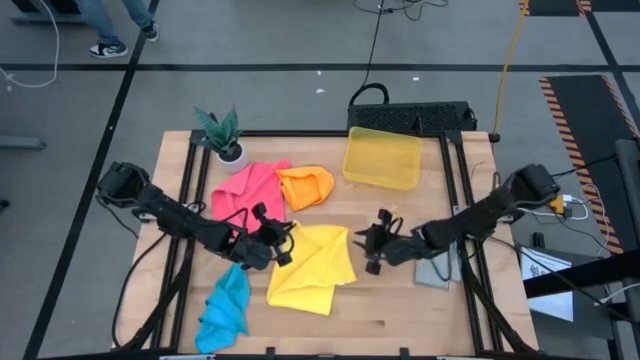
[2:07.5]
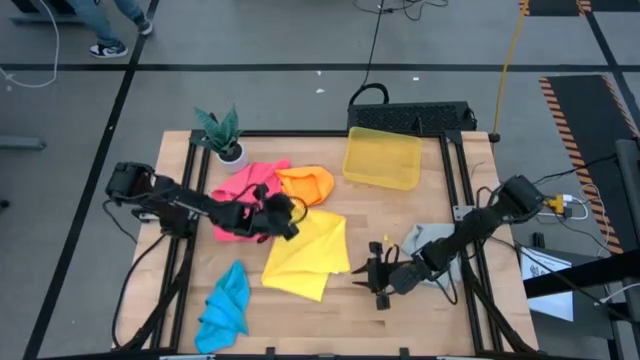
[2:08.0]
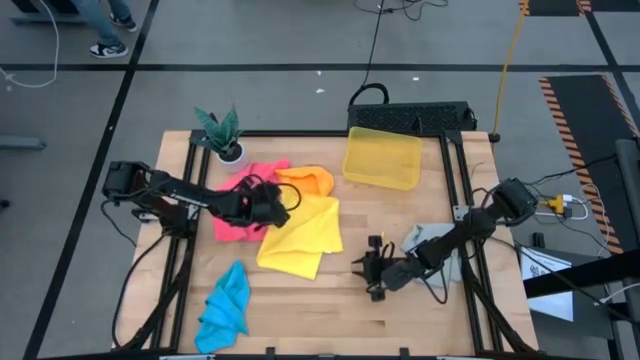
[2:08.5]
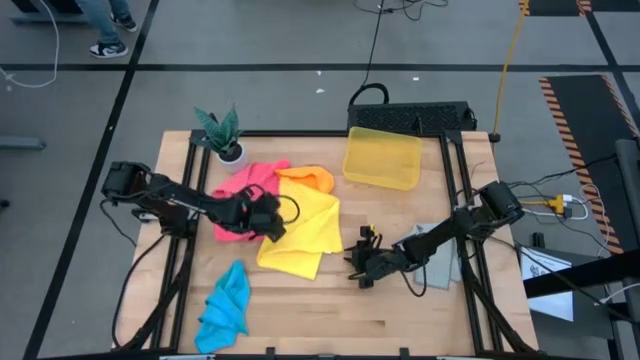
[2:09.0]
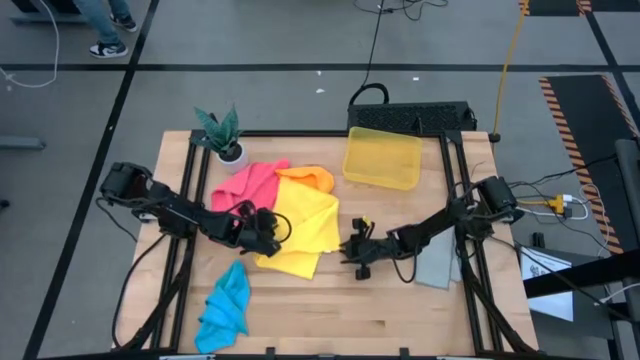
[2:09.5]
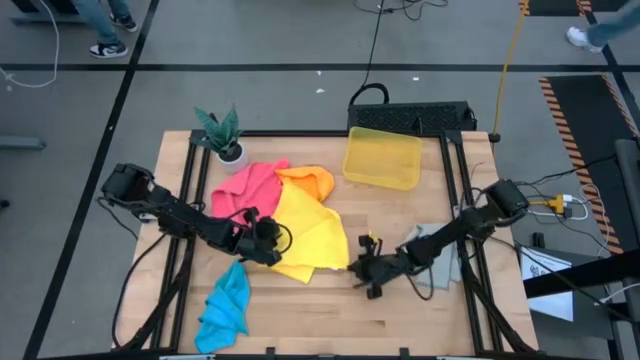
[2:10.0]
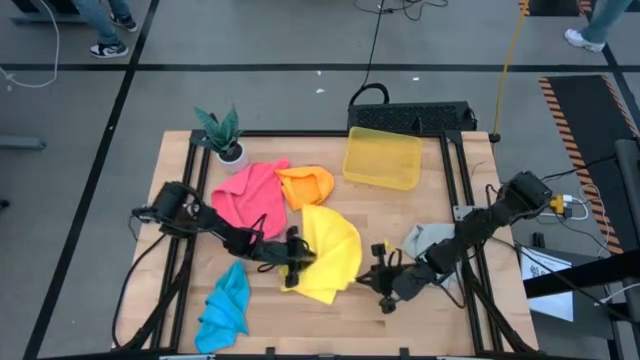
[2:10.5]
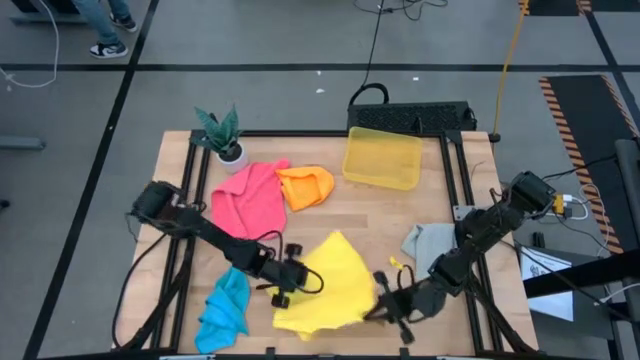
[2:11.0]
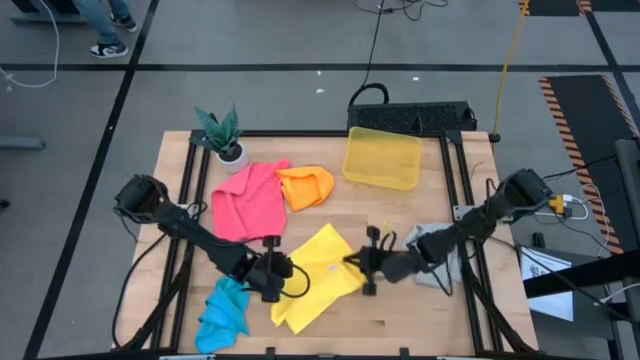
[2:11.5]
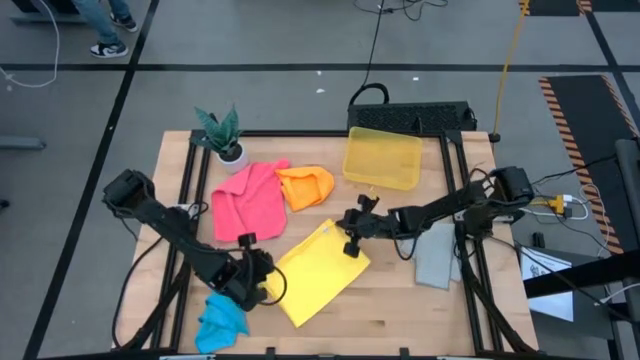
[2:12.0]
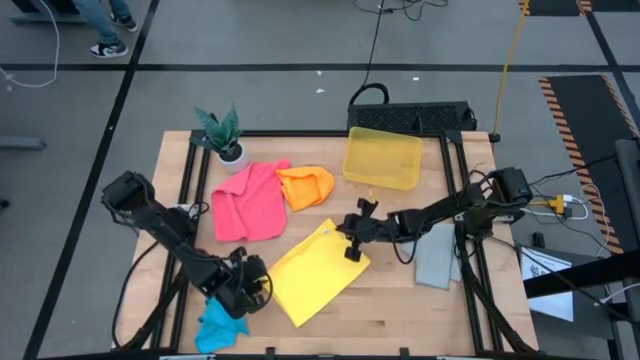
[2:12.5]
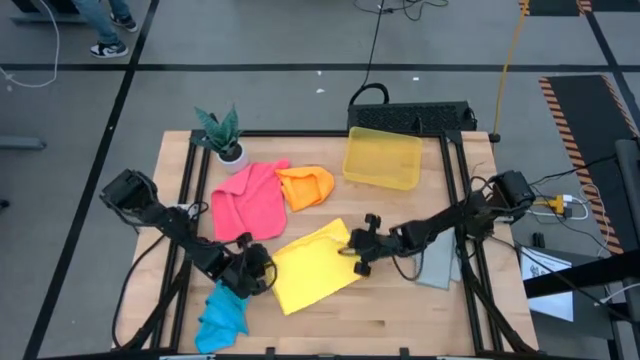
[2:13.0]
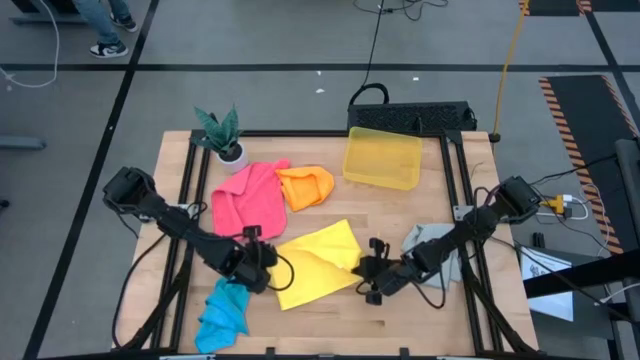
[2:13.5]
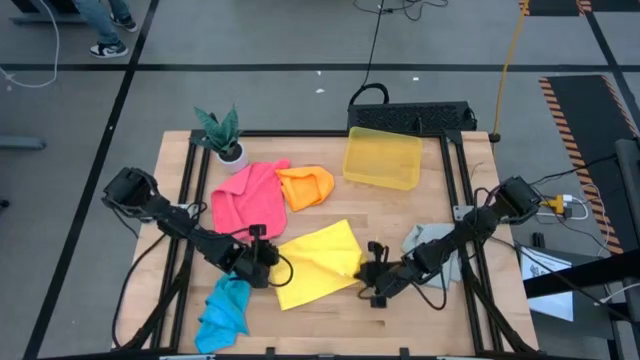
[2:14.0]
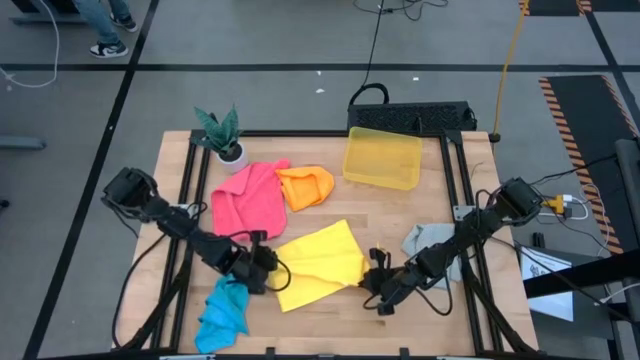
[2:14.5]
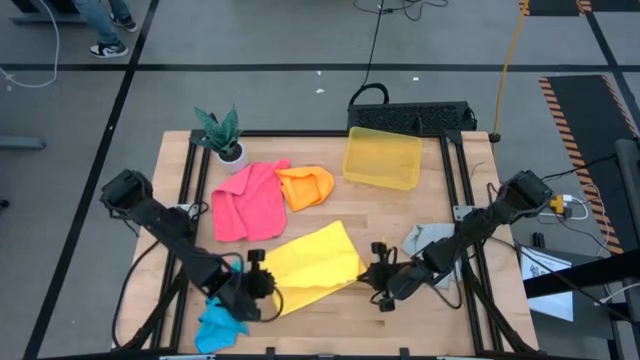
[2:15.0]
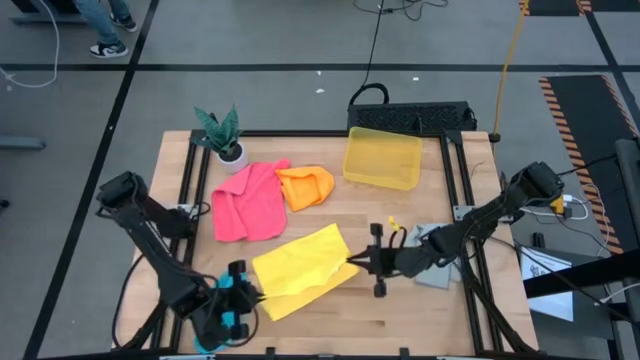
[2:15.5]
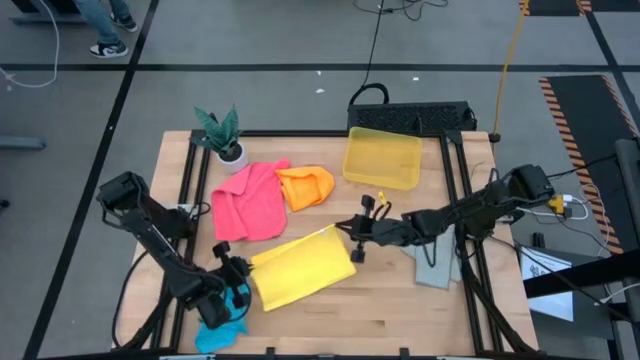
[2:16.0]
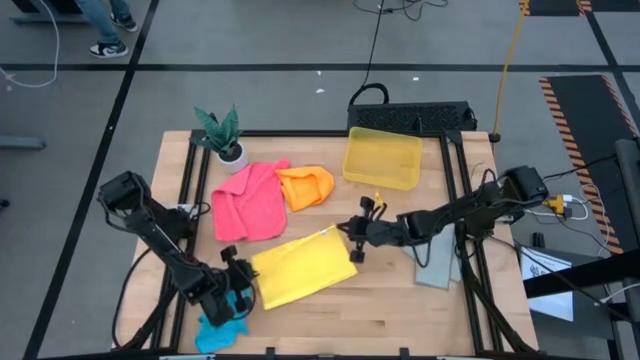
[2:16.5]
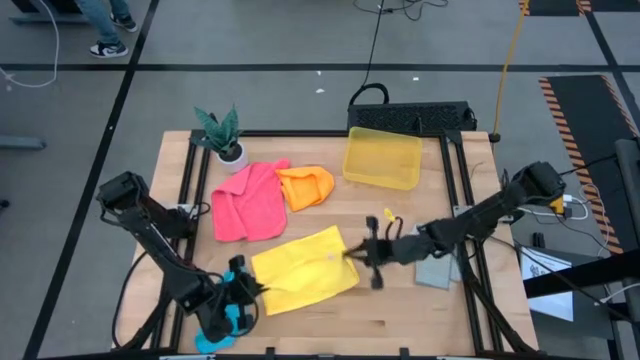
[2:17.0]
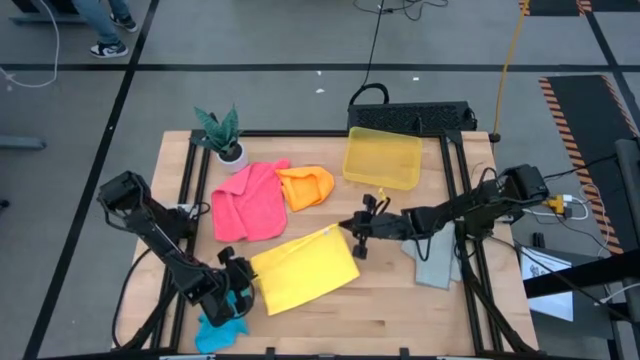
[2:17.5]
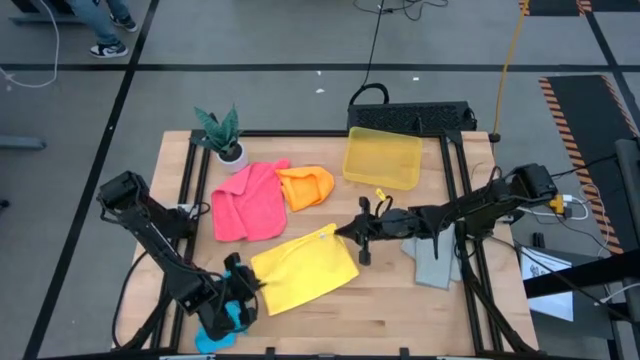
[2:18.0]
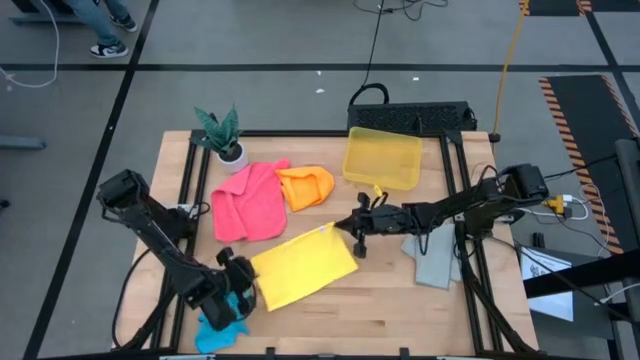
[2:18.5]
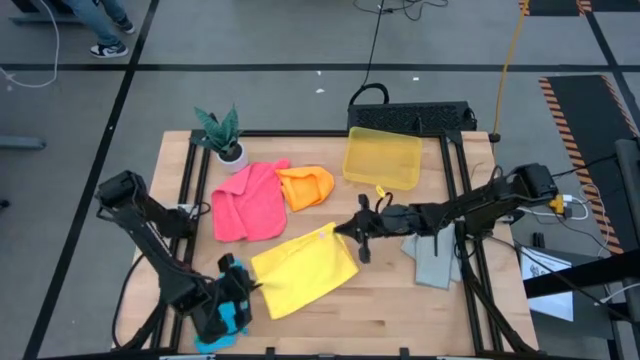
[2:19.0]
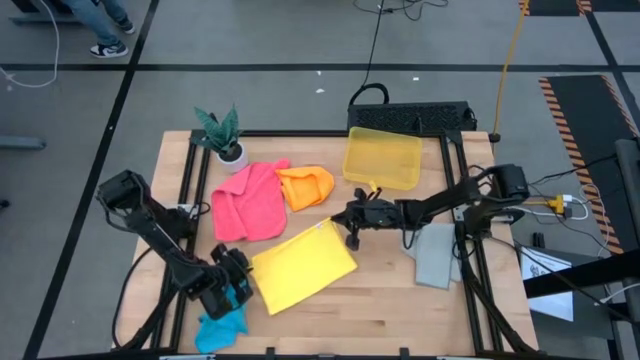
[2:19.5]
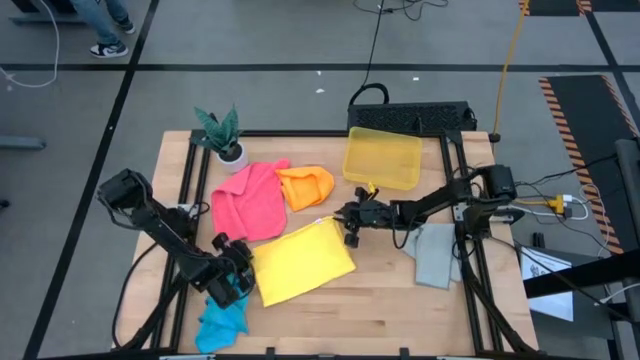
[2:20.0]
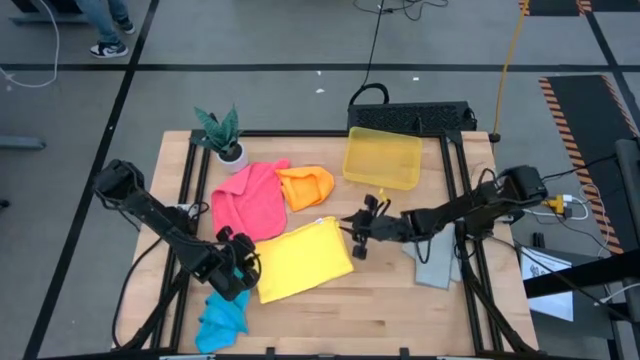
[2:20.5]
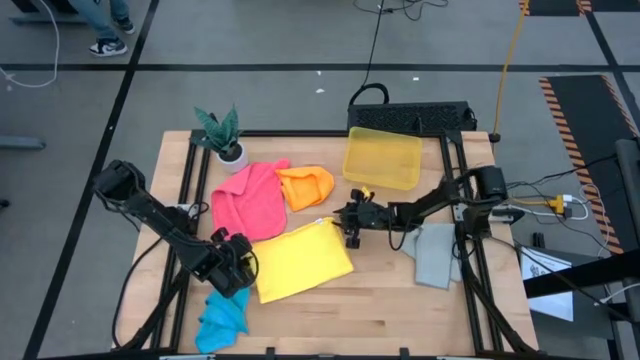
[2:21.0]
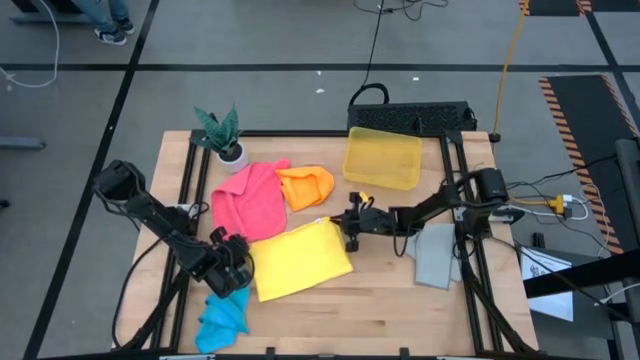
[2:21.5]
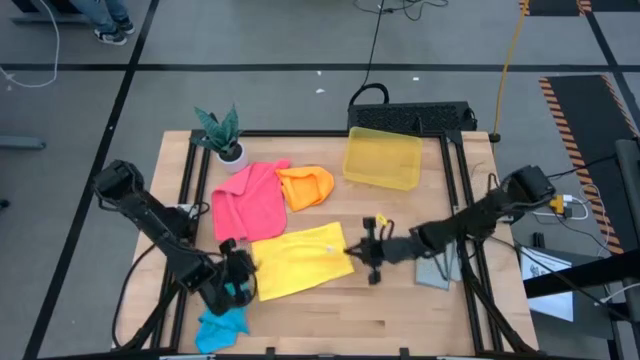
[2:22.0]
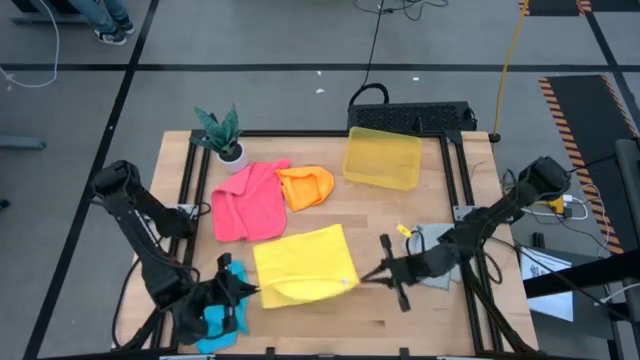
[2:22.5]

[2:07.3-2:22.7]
Task: Fold microfiber towels
Fold the yellow kitchen towel

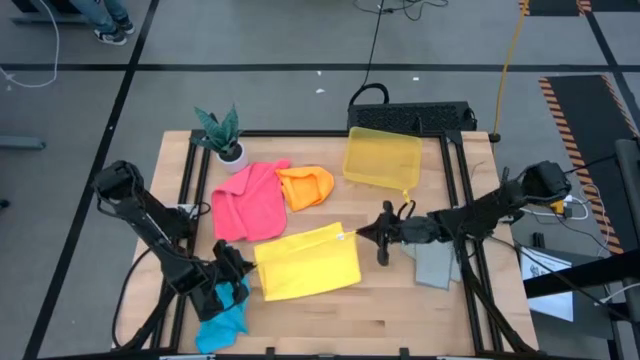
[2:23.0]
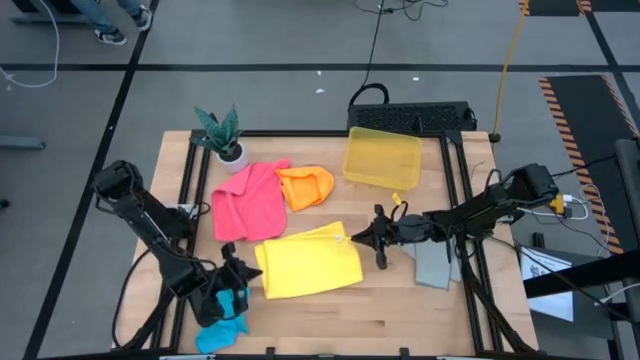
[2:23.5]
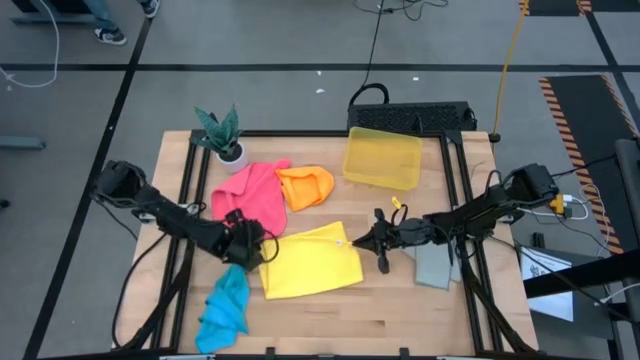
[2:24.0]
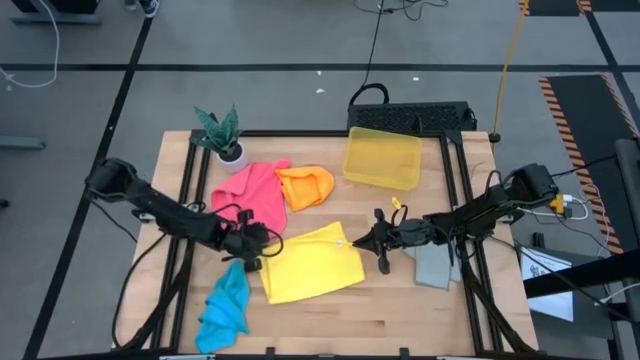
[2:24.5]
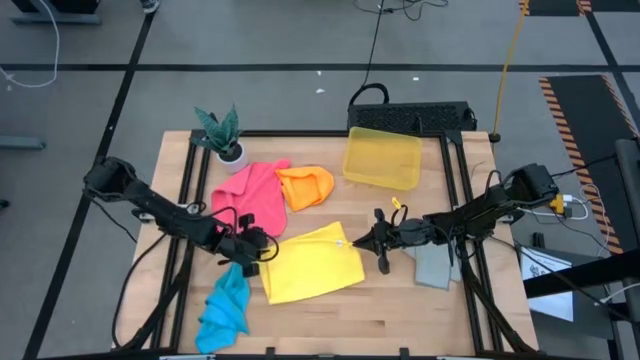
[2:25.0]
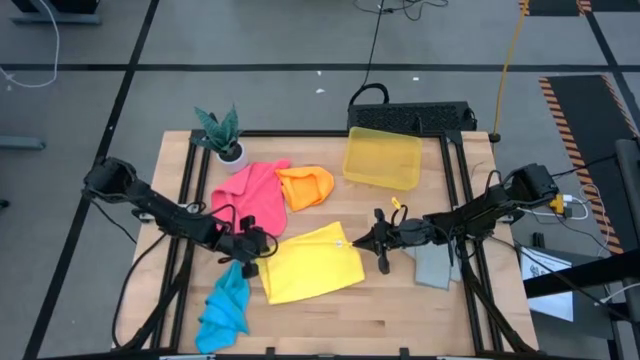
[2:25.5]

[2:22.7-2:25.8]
Fold the yellow kitchen towel
